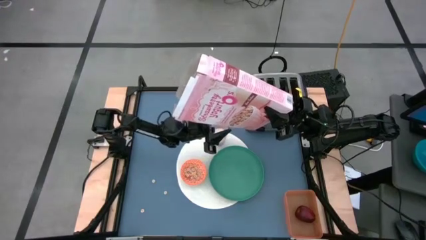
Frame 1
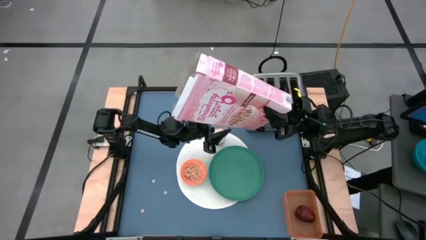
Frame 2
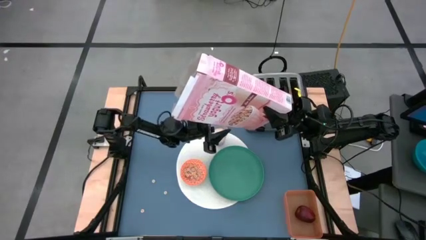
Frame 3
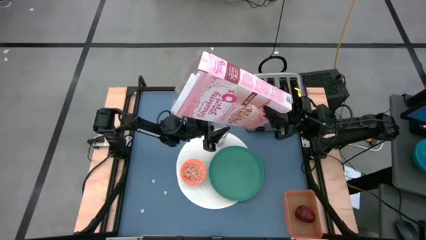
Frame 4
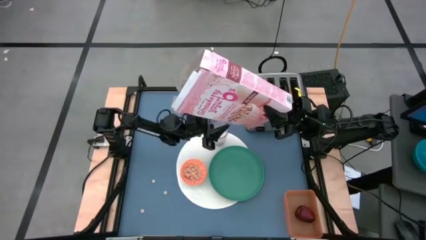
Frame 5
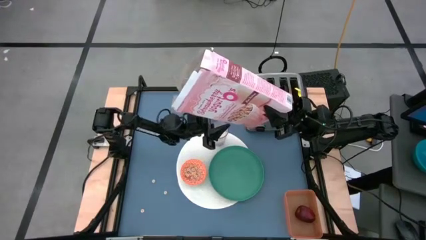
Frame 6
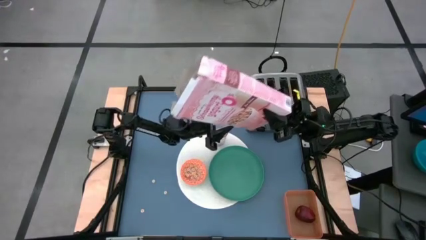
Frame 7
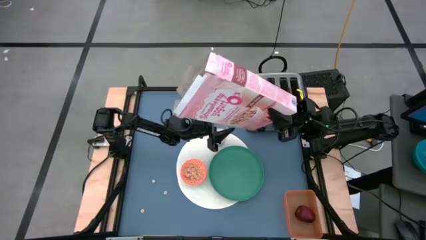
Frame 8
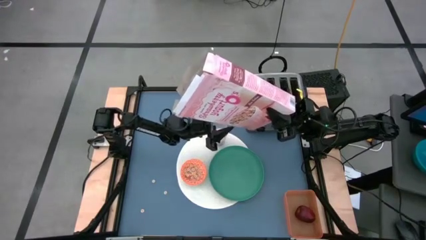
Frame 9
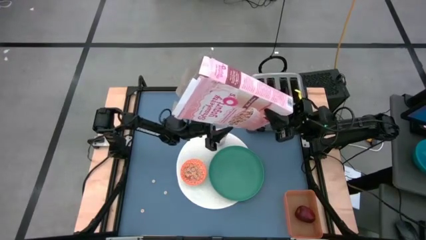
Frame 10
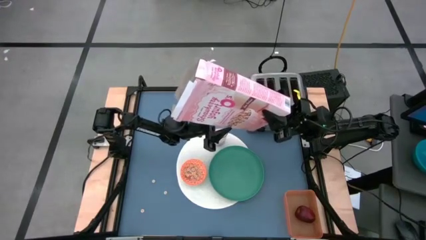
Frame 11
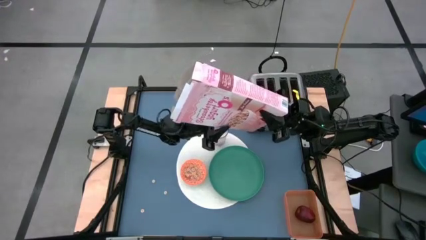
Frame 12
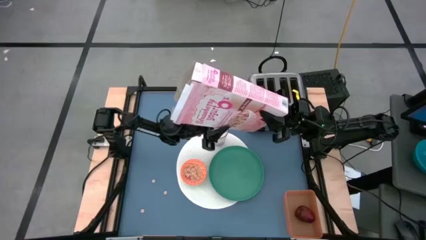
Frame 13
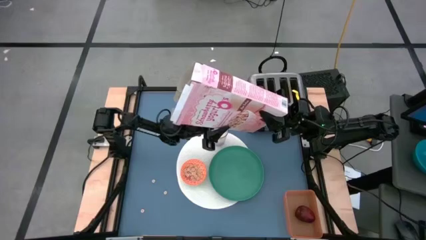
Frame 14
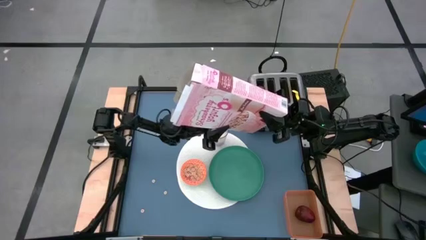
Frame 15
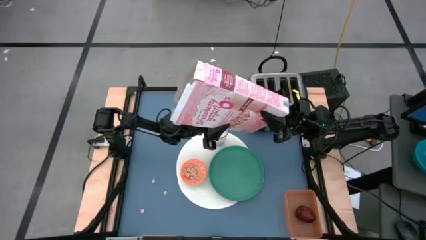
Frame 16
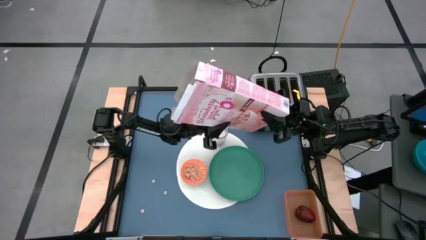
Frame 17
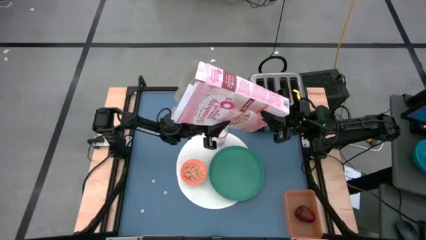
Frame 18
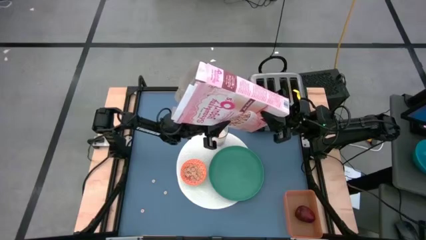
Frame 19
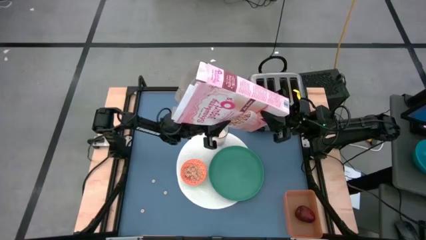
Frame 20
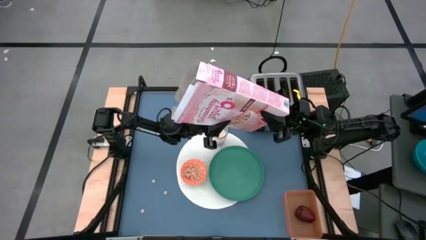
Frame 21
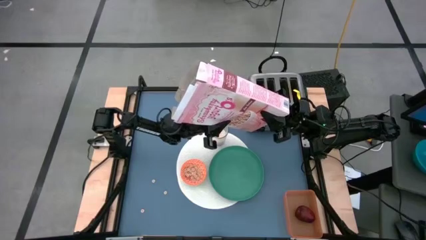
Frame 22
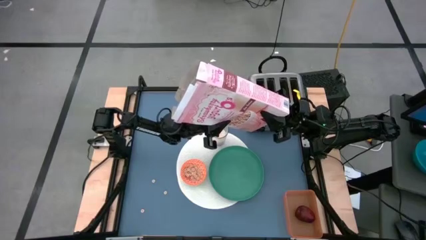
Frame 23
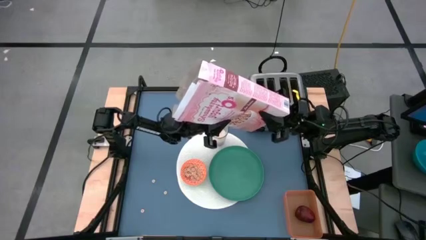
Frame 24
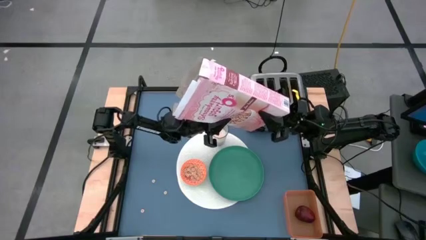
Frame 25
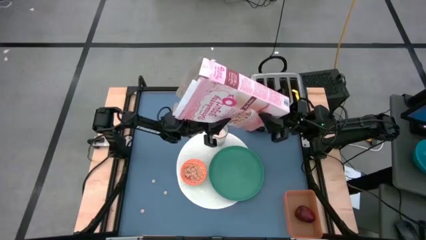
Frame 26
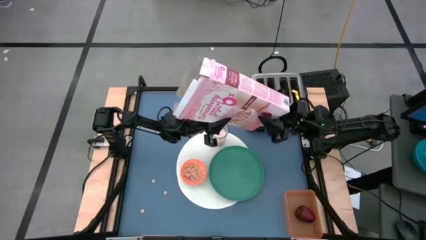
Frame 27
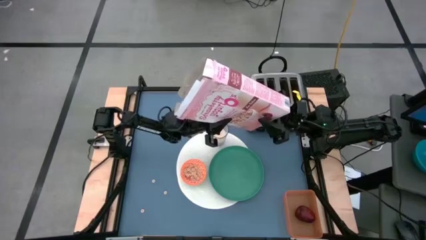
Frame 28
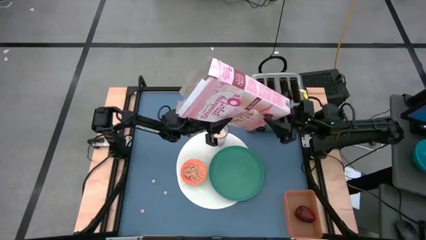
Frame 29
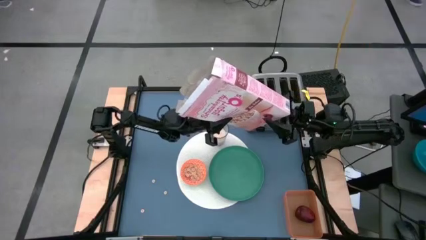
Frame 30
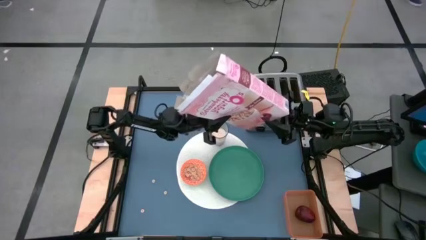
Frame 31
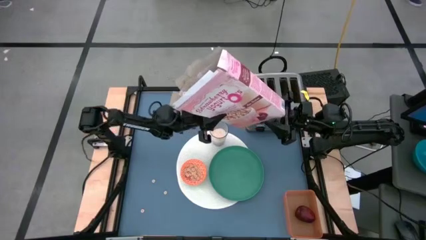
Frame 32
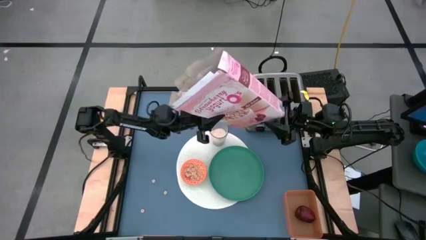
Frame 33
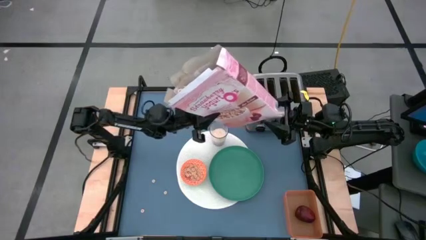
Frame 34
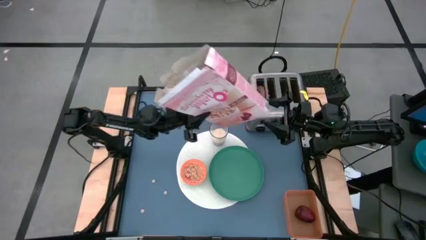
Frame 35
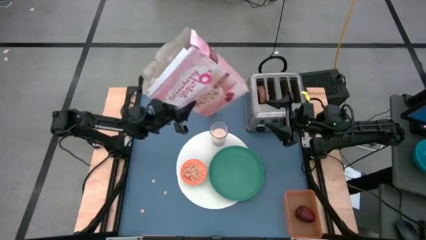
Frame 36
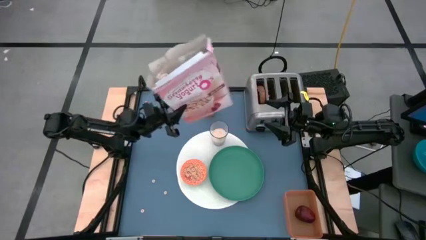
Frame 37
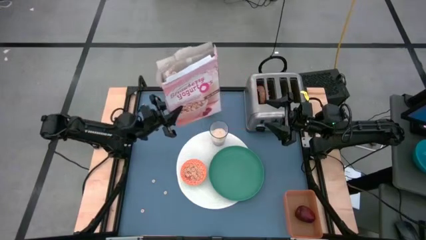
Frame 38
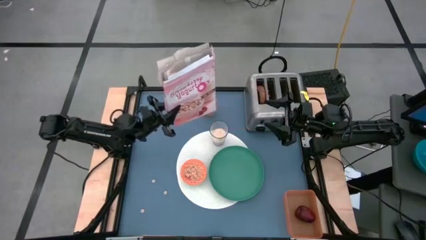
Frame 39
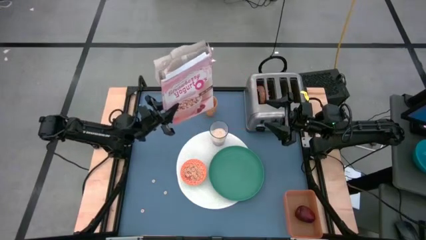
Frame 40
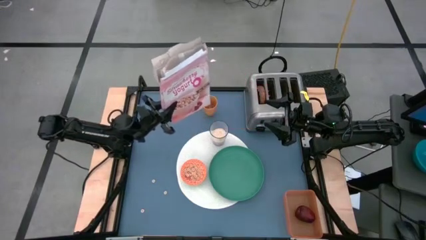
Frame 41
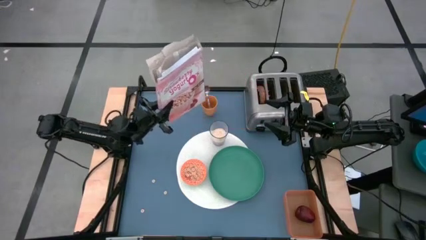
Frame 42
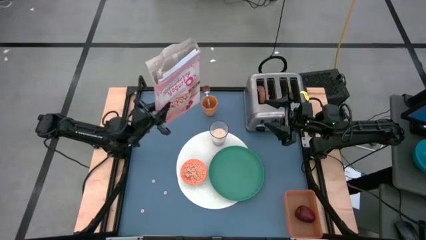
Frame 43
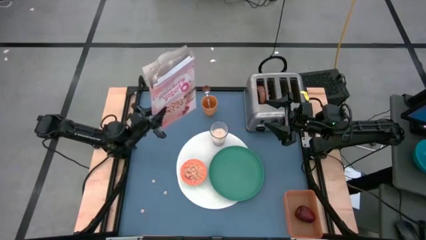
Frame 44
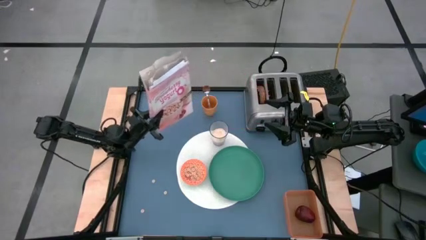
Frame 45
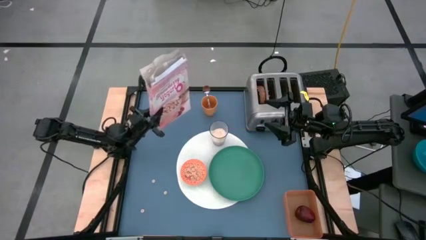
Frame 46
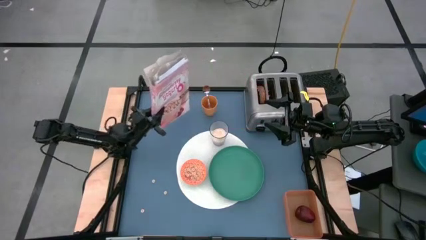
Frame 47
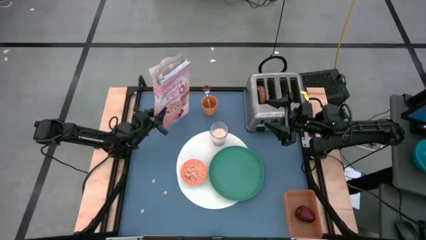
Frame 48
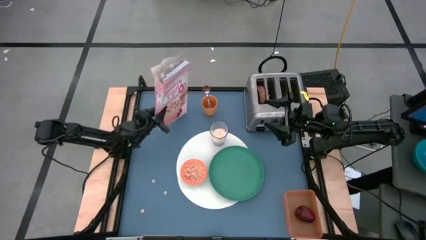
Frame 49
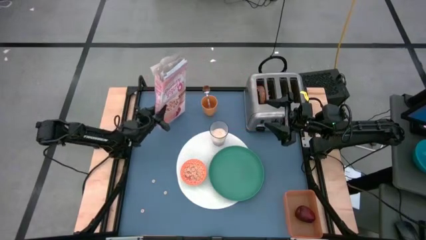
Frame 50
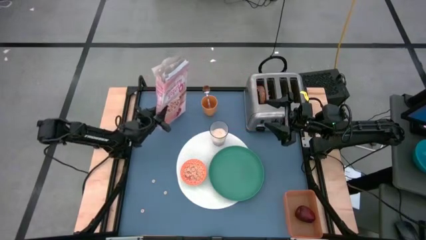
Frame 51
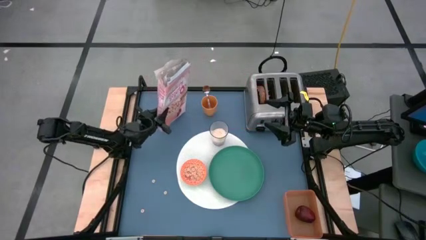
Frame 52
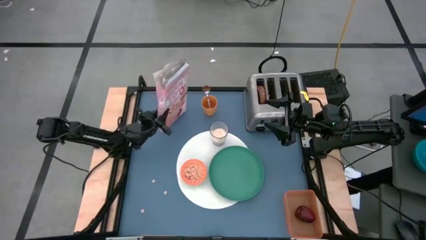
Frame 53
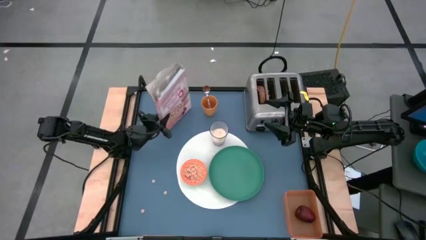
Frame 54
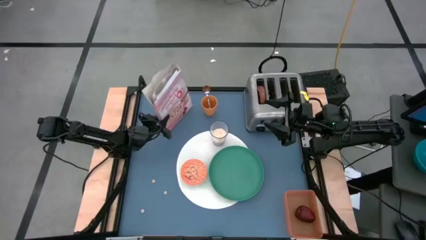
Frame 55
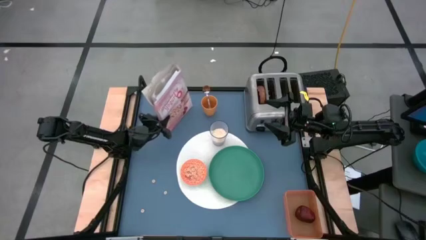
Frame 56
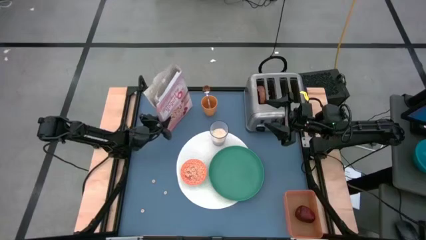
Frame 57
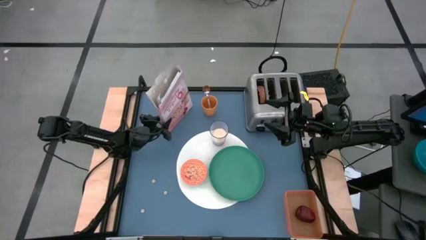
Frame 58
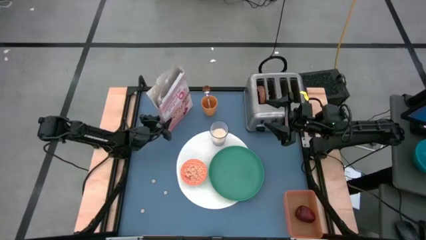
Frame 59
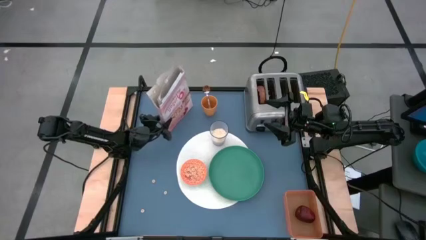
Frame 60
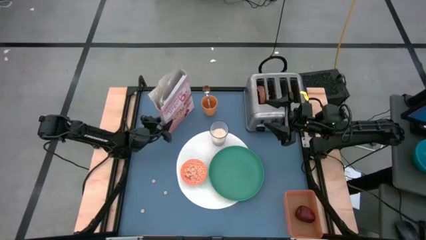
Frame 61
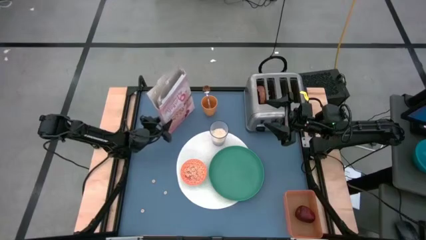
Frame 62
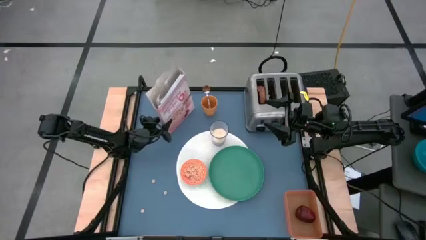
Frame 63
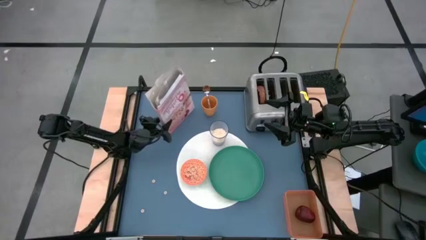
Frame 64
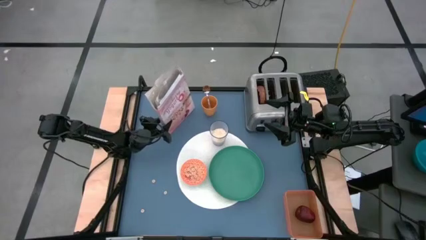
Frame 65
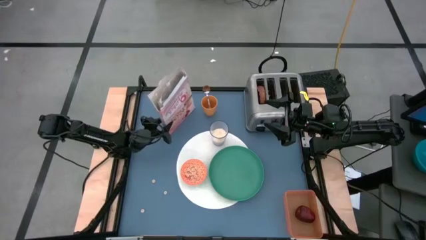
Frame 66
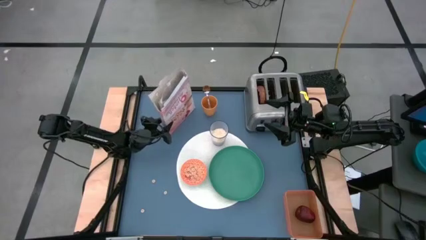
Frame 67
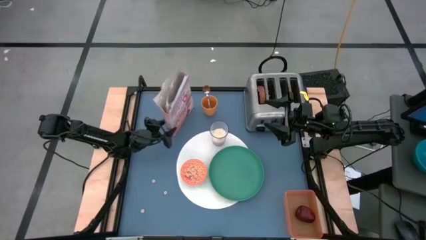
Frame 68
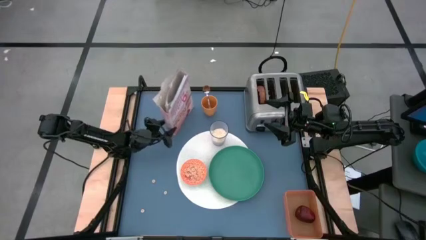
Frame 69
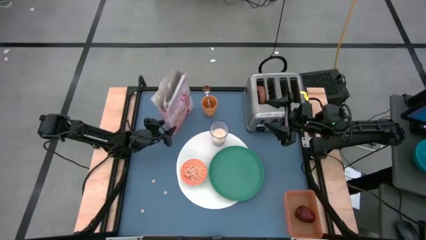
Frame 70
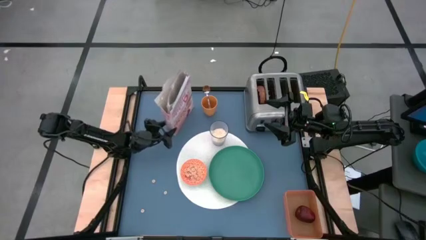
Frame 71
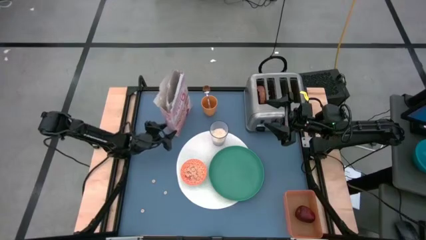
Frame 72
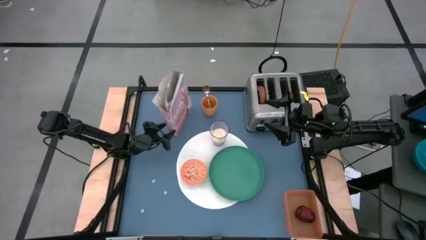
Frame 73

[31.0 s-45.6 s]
Task: Arrange a breakfast setting
Pour the cereal into the orange bowl

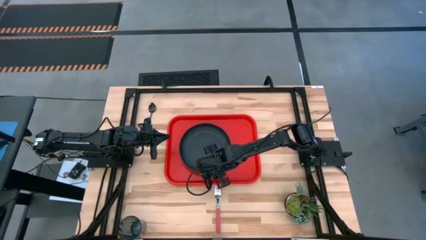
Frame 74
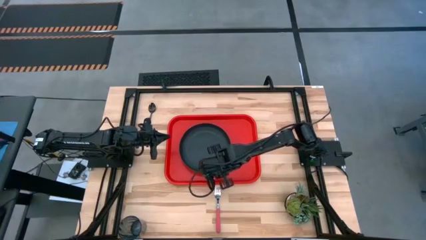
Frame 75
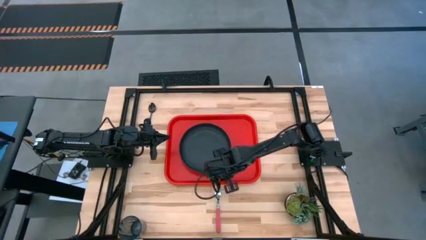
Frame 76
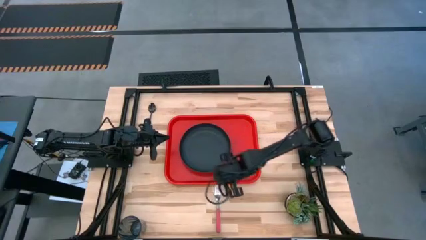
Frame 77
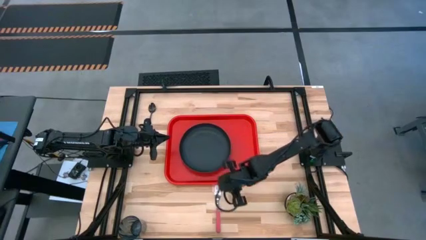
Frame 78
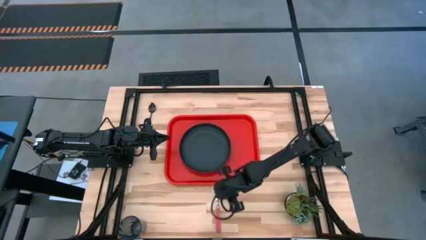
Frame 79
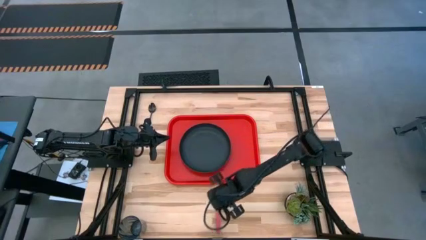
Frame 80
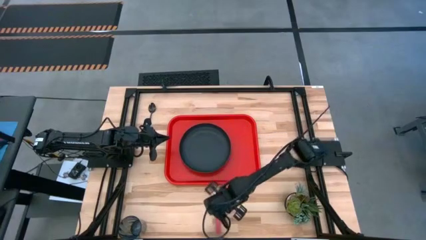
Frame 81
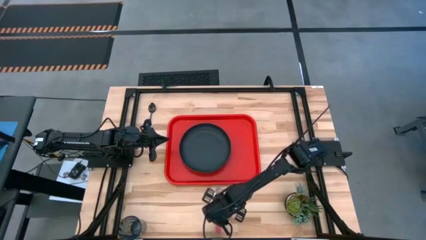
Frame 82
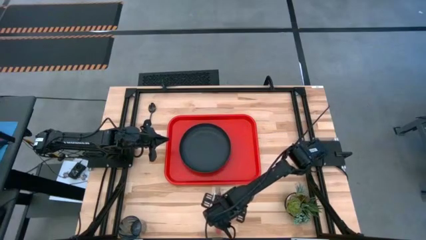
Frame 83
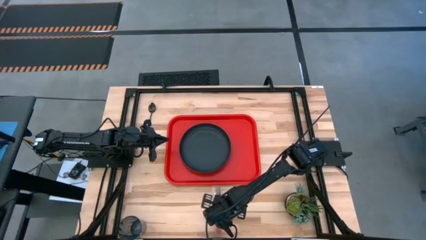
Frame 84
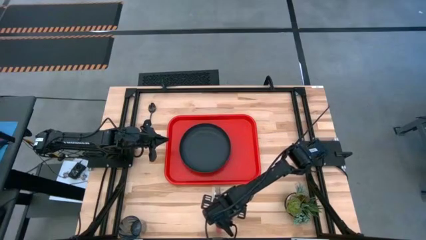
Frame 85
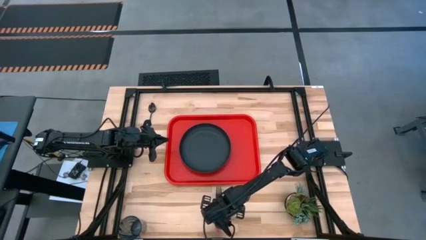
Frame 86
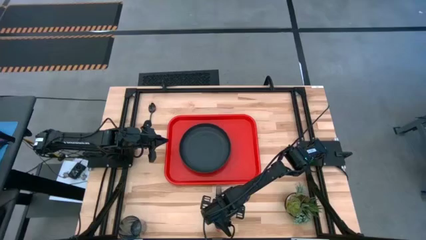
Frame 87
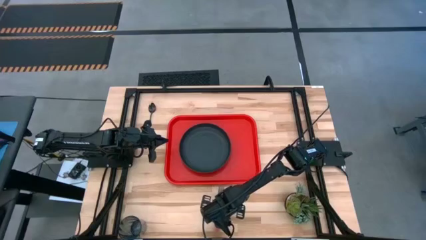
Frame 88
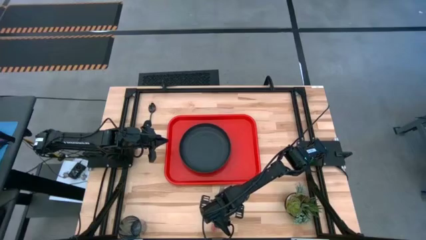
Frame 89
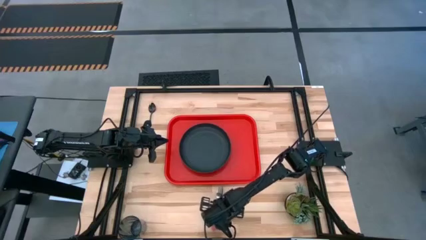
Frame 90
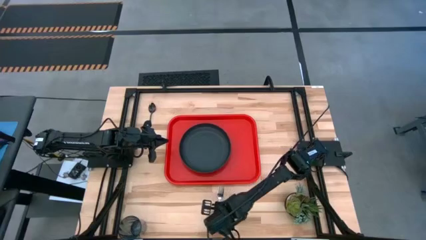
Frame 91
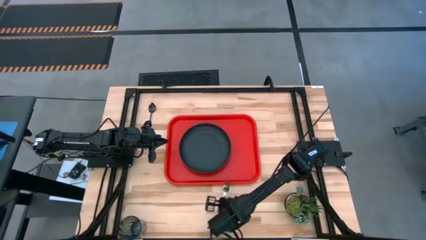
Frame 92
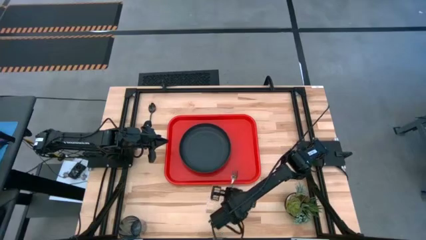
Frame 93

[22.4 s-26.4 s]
Task: Pick and place plate/cup/fork/spoon on tray
Put the pink fork on the red tray to the right of the black plate
